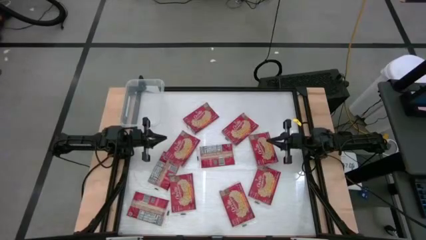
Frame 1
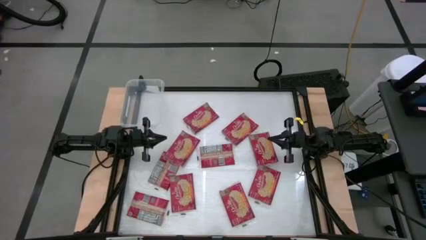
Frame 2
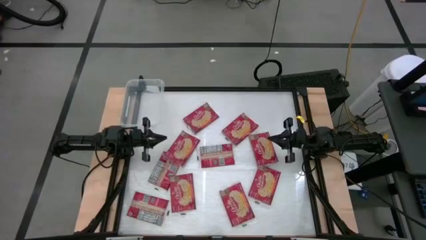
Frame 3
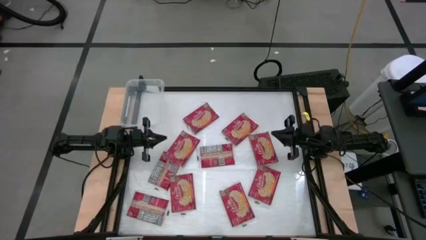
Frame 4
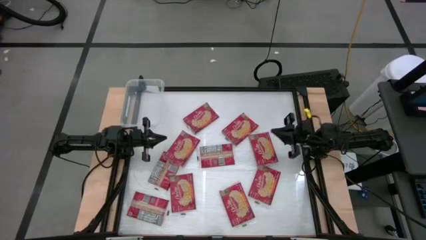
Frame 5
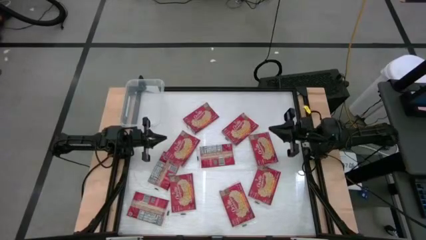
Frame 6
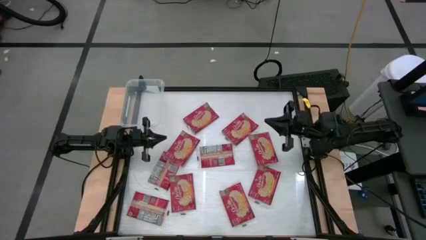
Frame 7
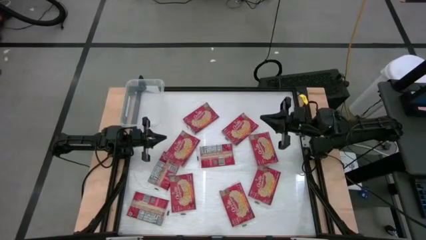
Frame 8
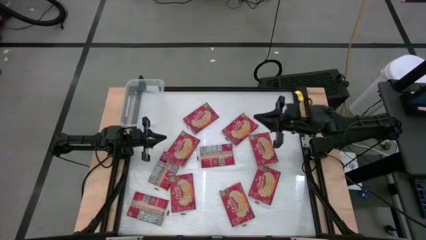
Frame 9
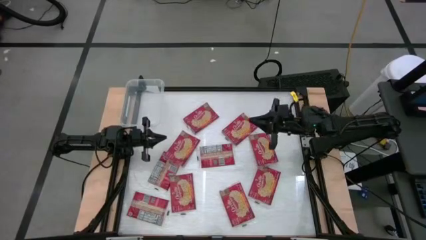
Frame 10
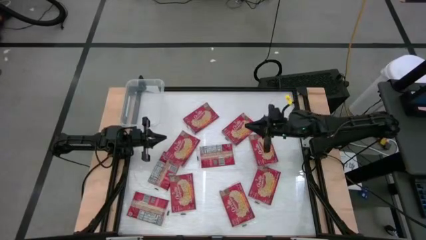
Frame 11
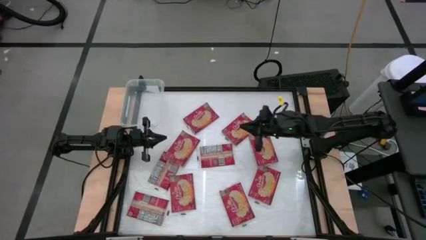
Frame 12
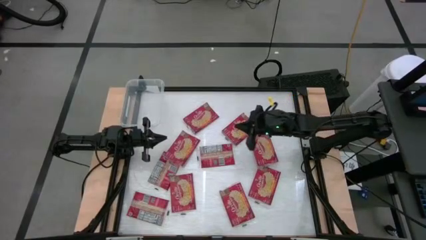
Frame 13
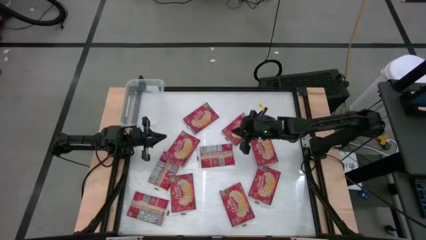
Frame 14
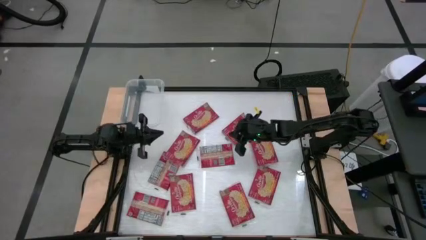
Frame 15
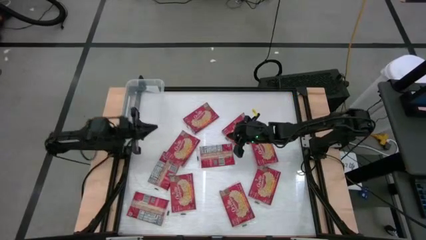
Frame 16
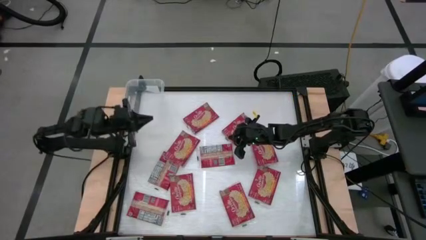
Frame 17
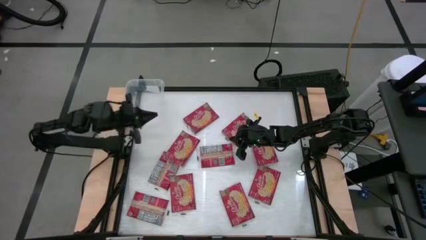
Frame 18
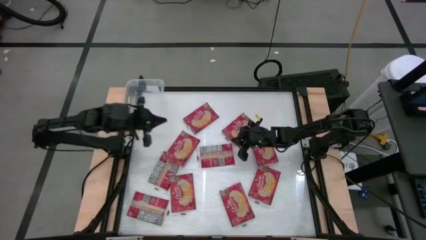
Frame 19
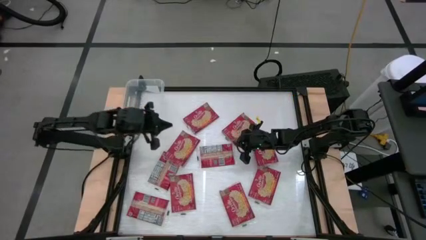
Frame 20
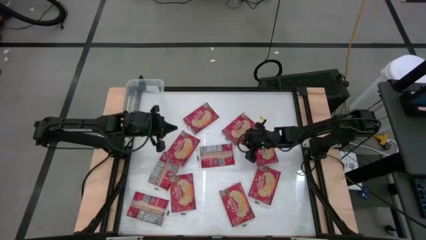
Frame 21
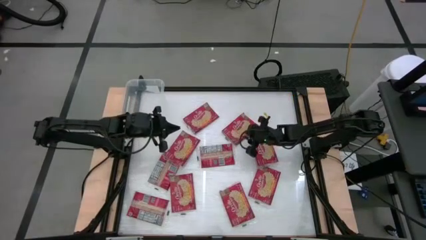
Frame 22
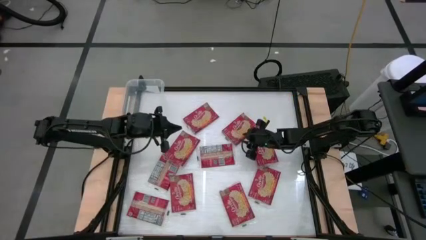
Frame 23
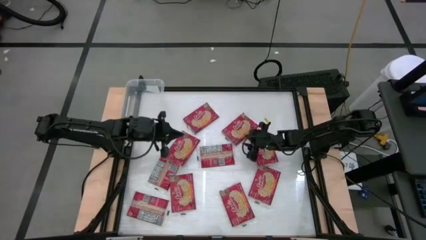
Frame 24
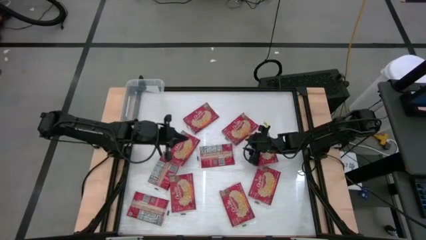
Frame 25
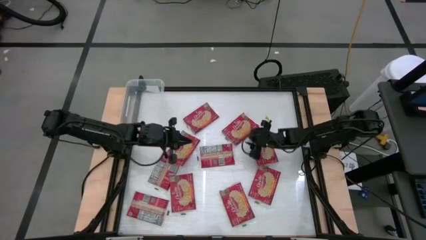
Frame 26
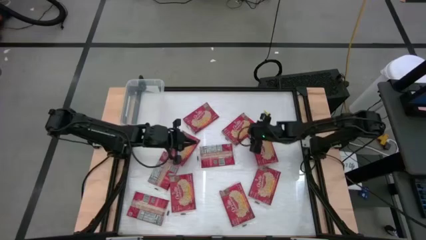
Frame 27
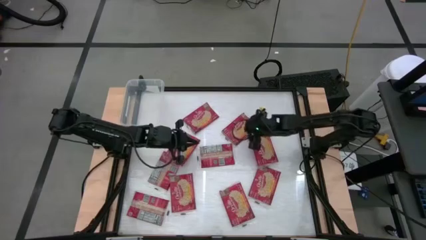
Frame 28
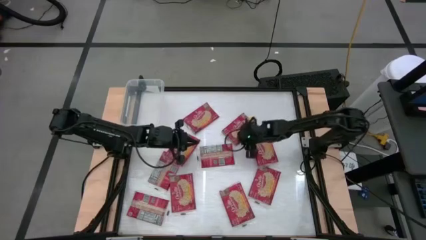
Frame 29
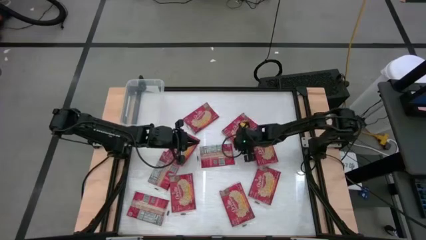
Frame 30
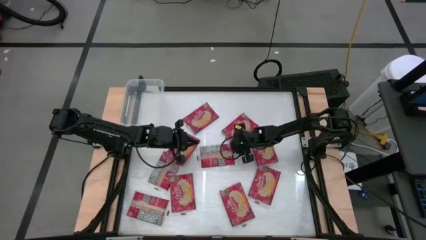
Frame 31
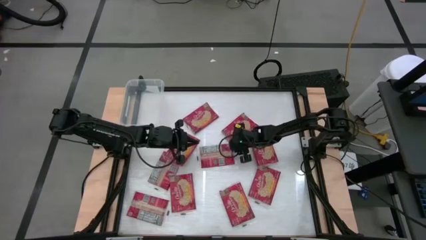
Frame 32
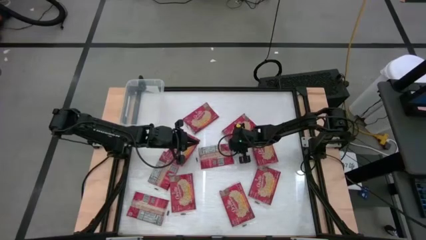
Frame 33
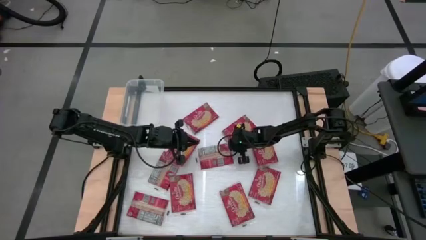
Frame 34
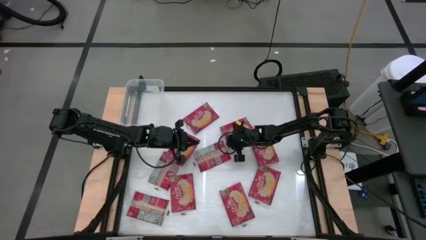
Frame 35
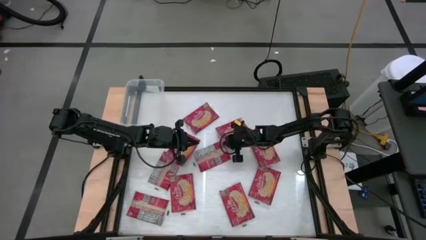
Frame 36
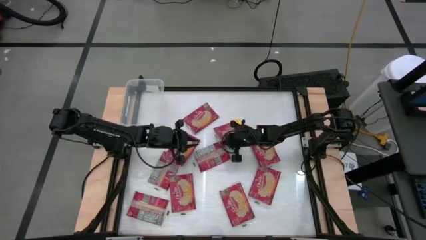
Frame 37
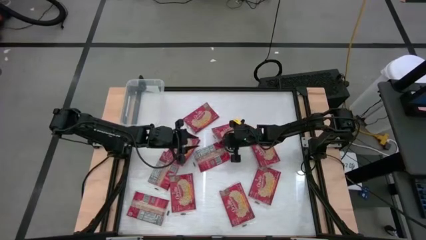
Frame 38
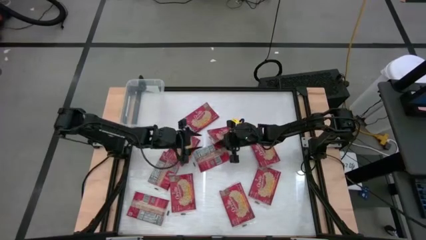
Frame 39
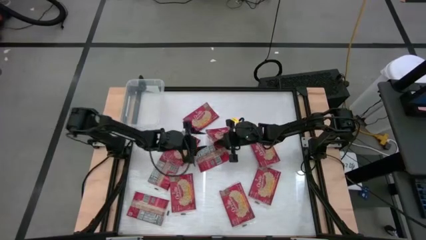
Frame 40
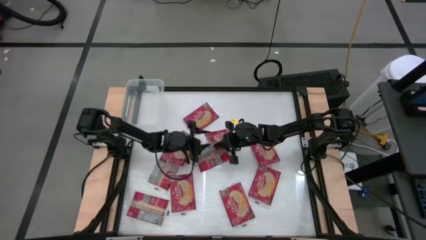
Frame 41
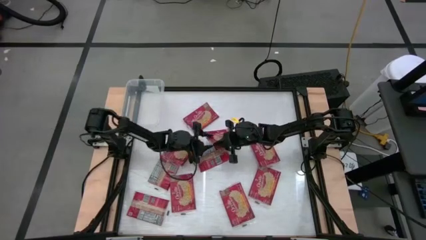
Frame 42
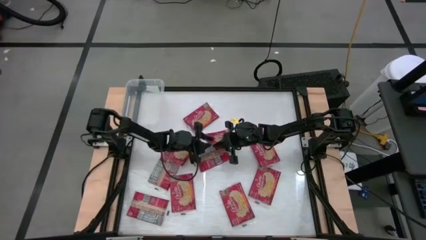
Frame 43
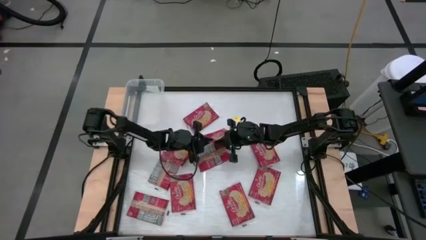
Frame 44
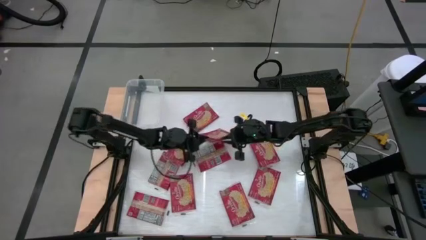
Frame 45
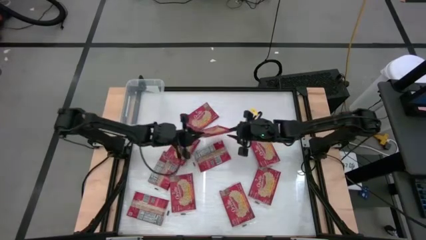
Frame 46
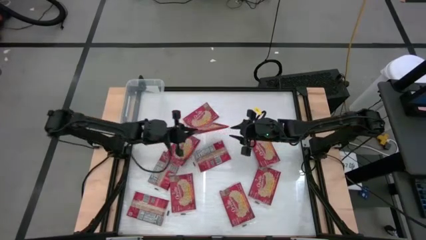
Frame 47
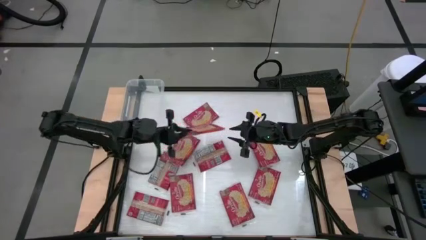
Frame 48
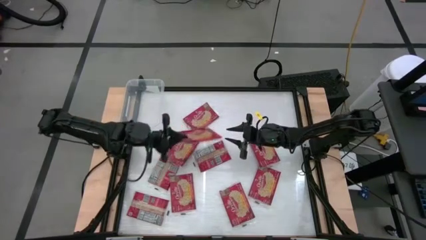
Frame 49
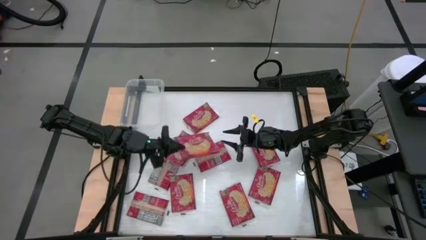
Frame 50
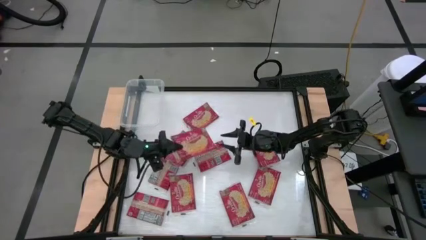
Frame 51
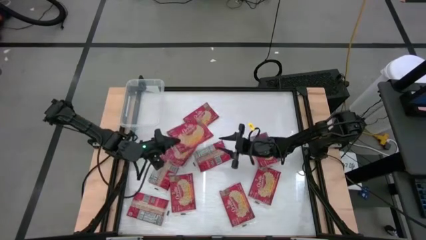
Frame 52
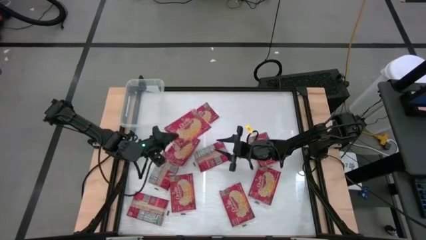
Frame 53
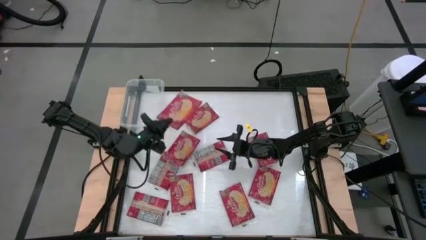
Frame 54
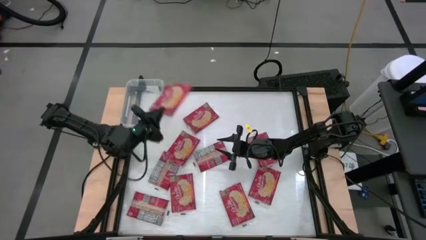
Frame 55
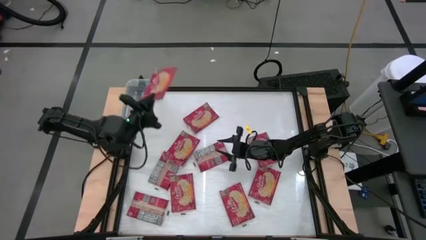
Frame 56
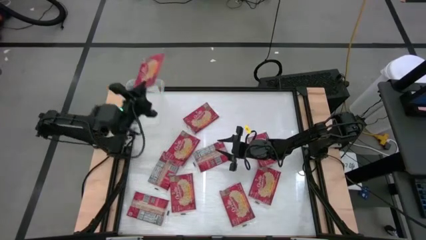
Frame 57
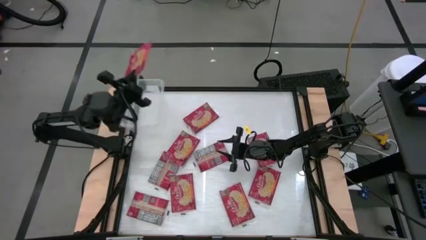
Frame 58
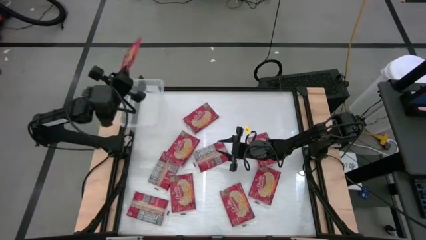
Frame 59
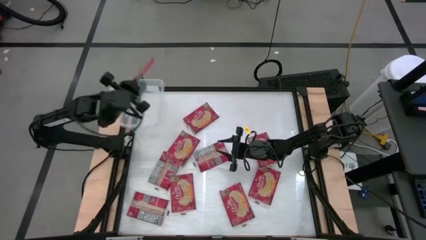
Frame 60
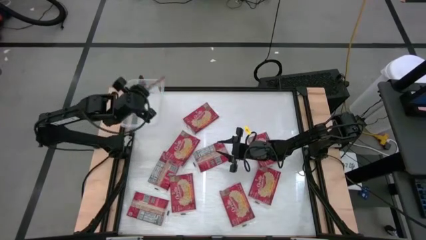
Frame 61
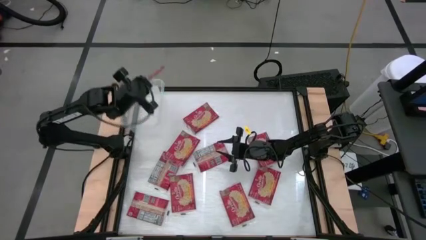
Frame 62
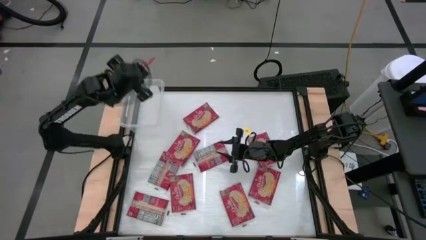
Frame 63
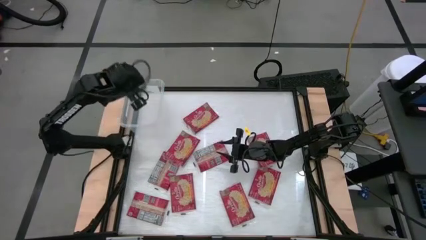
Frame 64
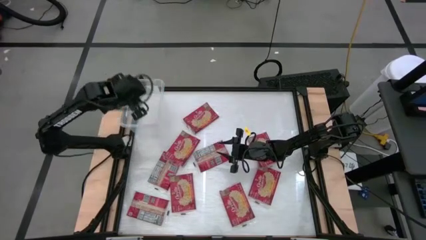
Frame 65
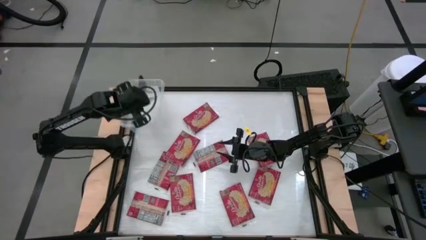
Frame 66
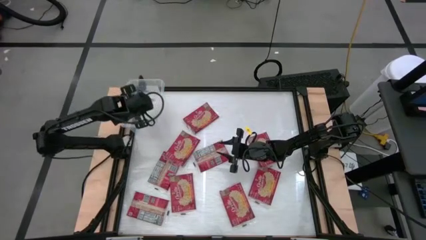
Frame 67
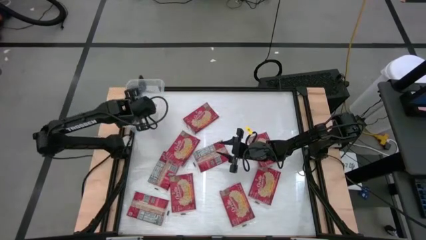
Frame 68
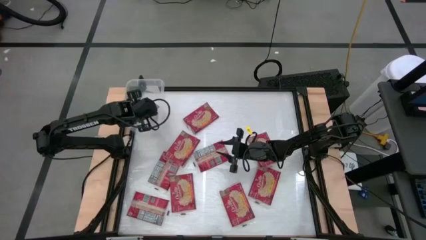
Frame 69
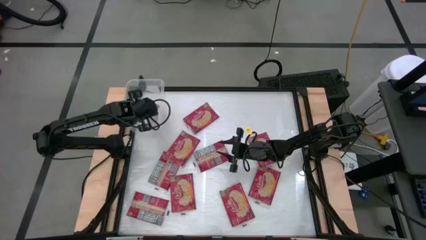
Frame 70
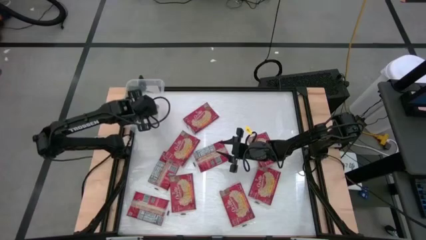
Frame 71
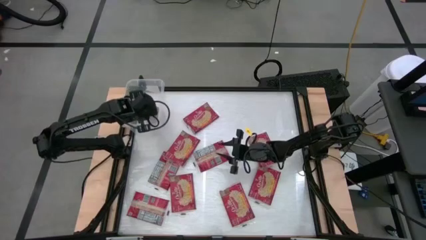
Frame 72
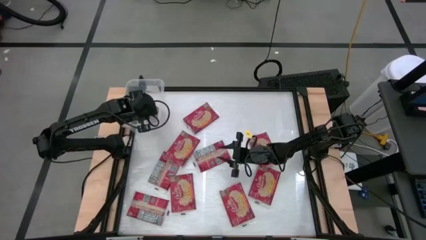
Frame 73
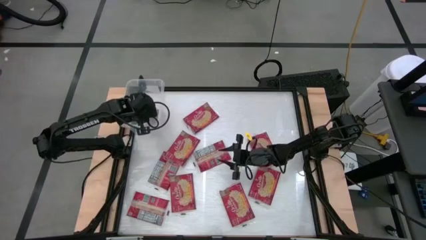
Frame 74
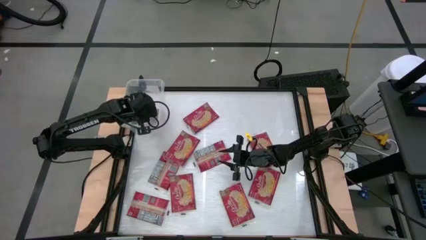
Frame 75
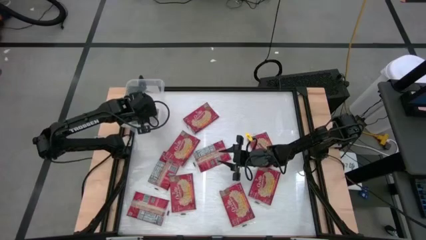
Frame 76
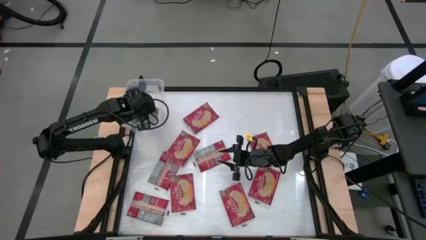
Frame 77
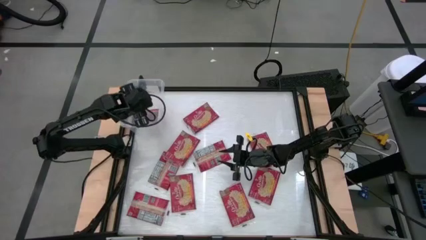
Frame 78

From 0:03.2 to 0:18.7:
Task: Sort popcorn bags into baskets
Put the red popcorn pack into the bin

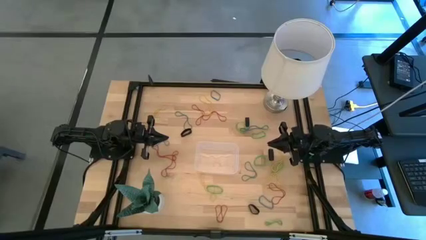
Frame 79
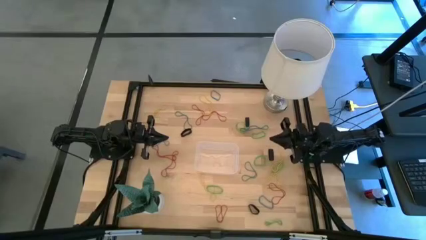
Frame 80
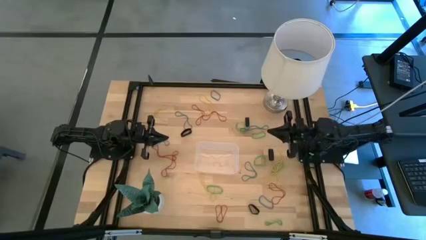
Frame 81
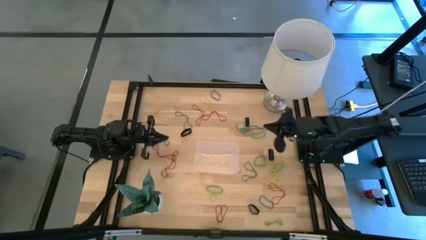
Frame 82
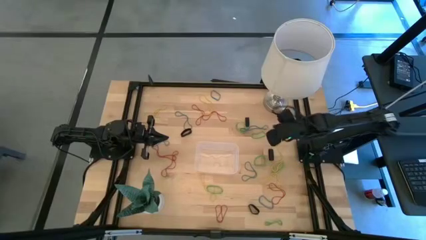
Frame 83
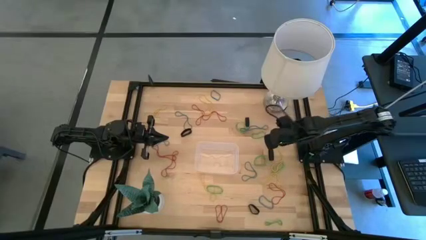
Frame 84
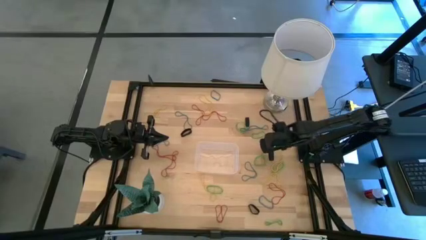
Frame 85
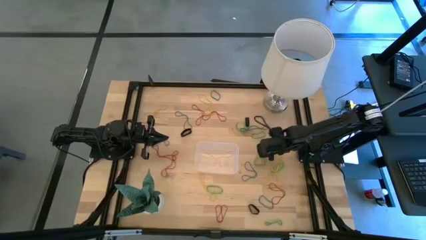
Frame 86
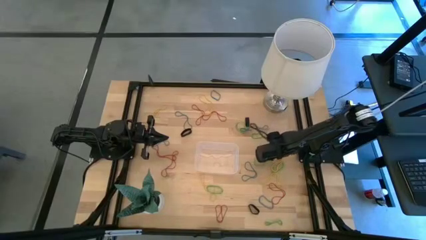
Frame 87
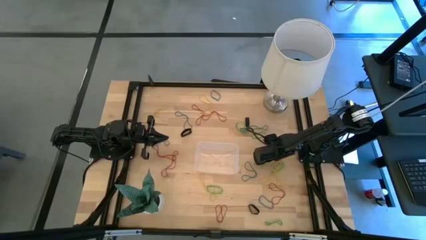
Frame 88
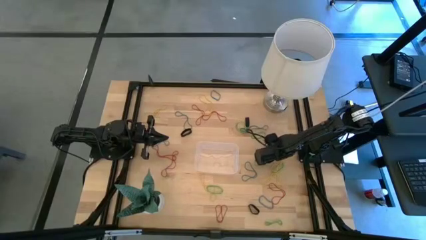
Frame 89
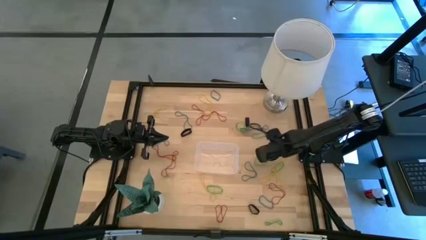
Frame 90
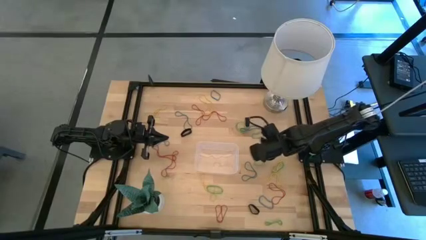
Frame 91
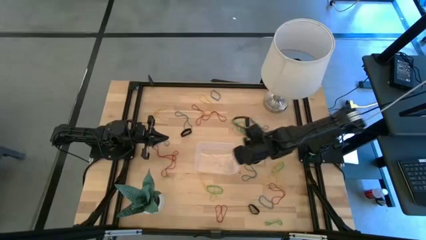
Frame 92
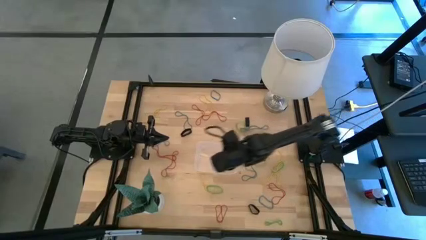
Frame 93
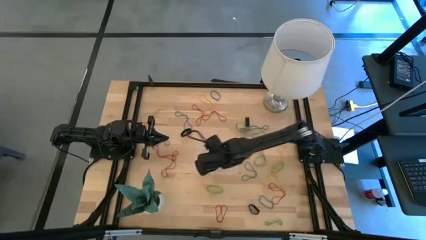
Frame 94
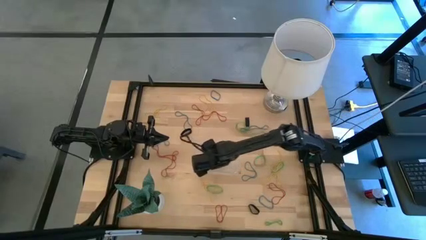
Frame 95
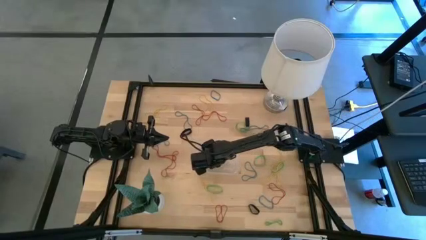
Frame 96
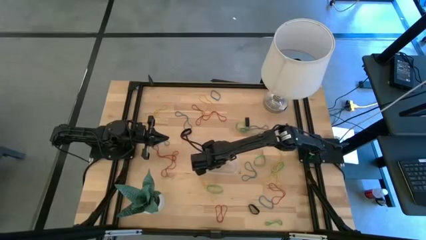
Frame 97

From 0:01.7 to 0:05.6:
Task: Pick and place rubber bands into bin
Put the black rubber band into the transparent bin
